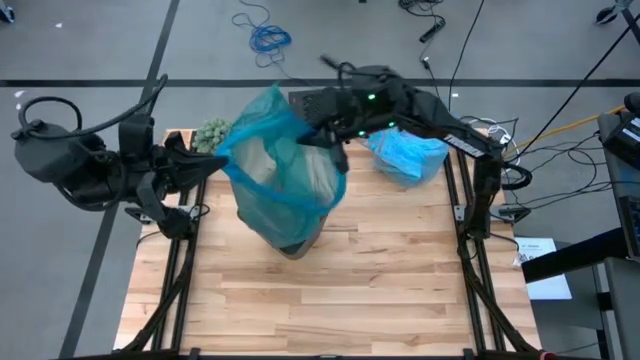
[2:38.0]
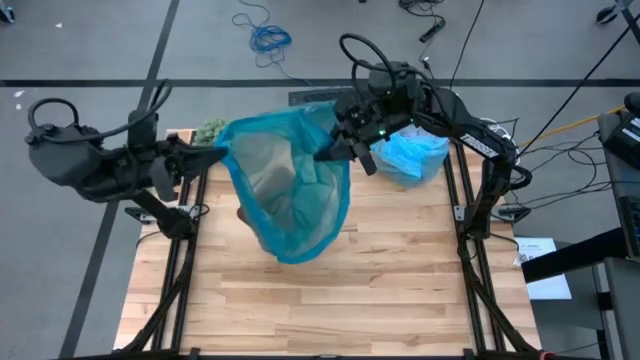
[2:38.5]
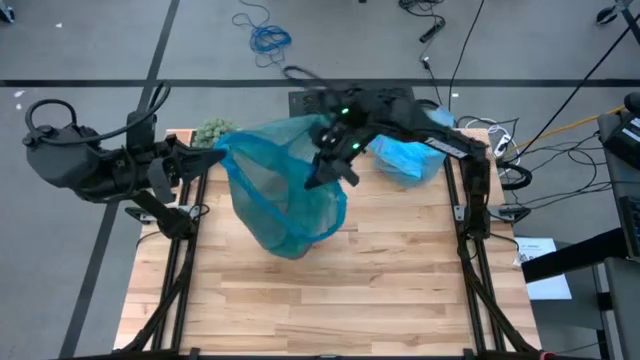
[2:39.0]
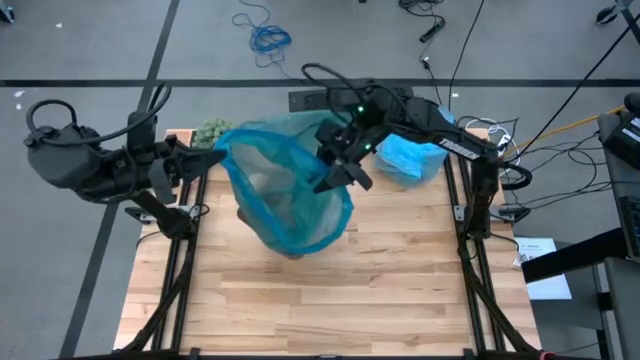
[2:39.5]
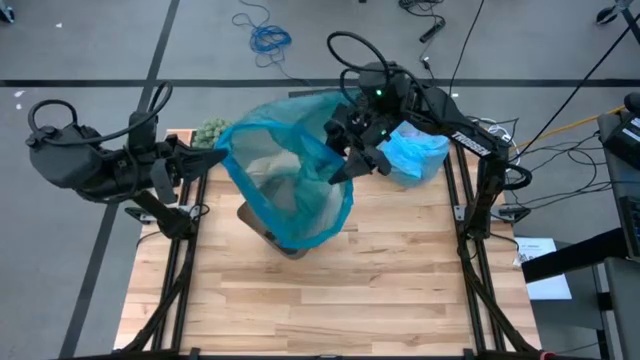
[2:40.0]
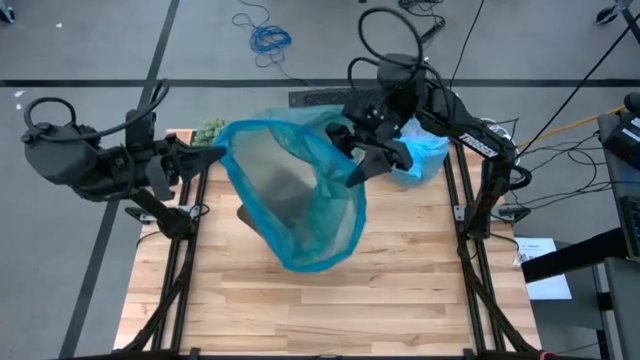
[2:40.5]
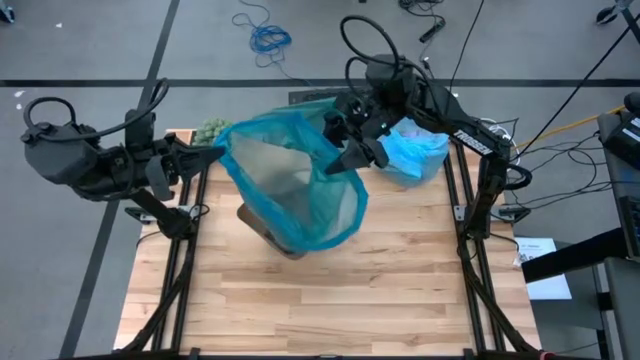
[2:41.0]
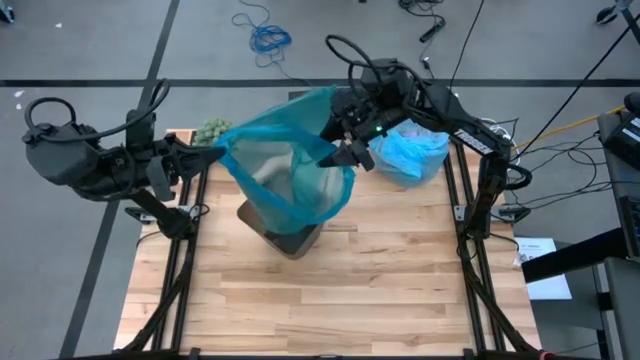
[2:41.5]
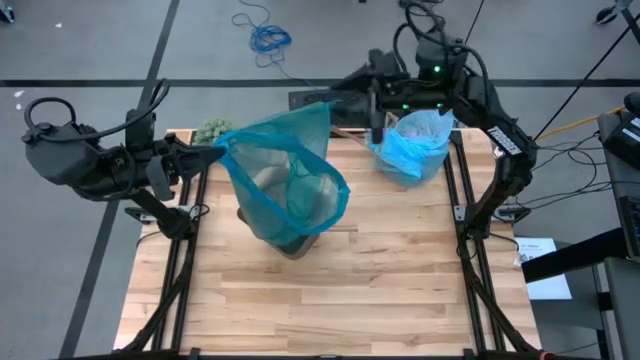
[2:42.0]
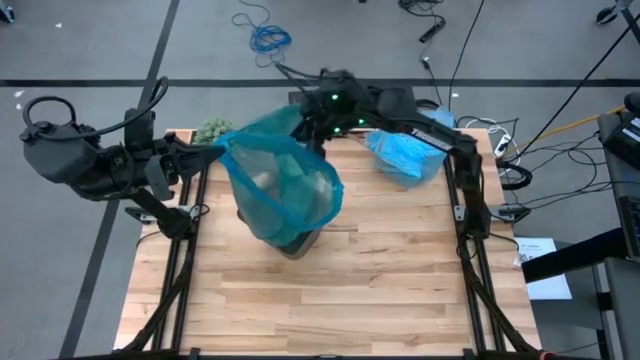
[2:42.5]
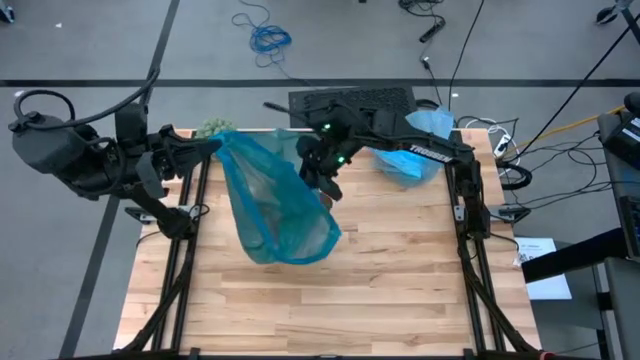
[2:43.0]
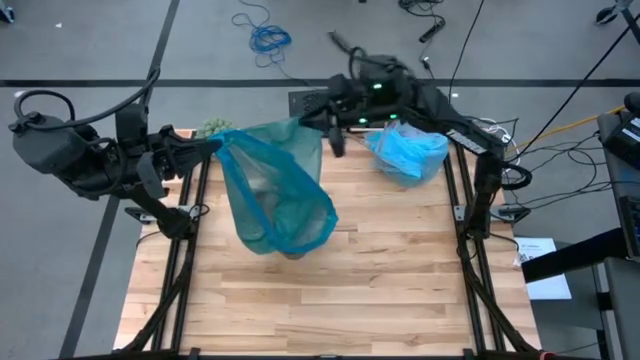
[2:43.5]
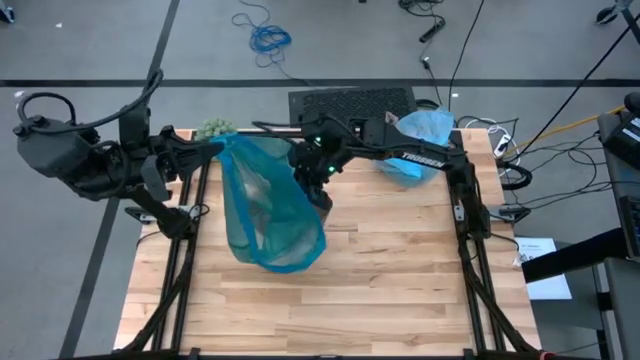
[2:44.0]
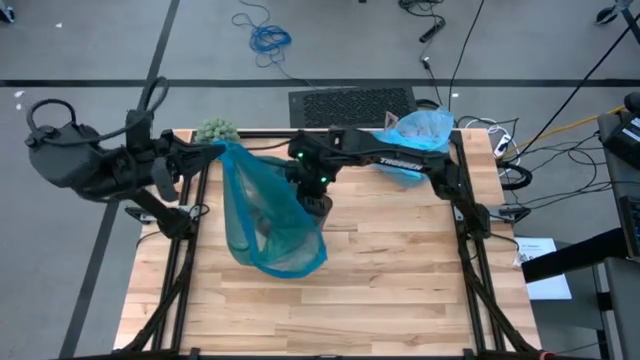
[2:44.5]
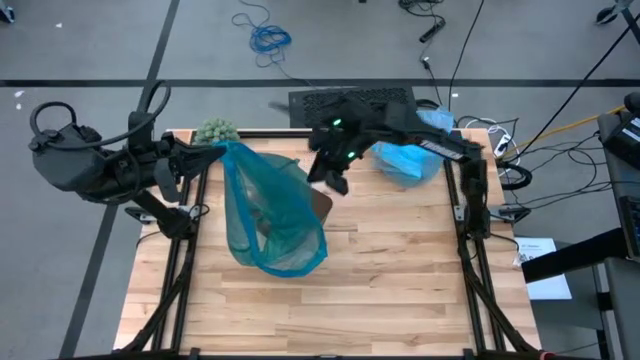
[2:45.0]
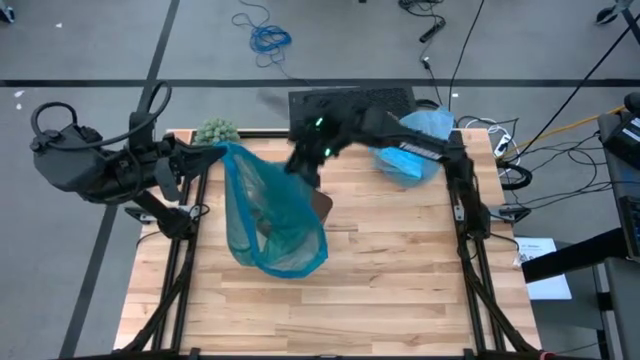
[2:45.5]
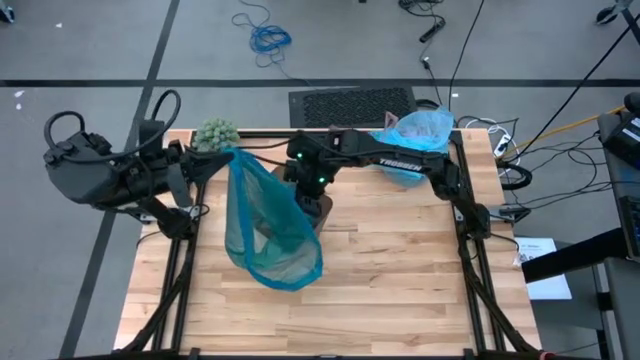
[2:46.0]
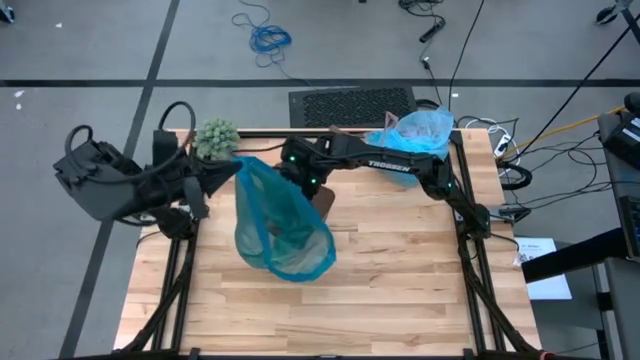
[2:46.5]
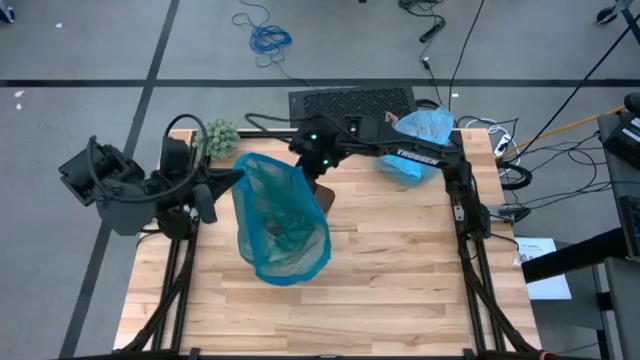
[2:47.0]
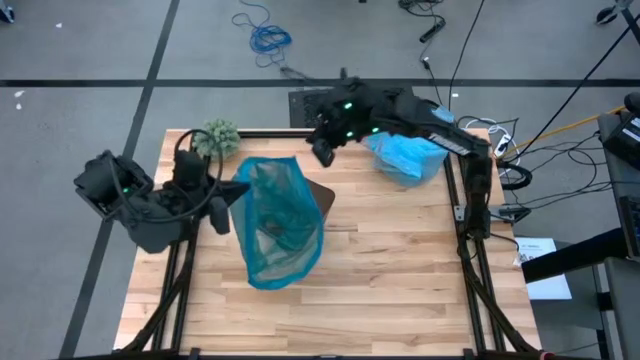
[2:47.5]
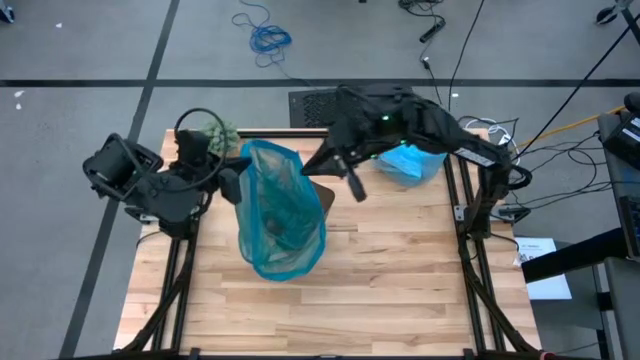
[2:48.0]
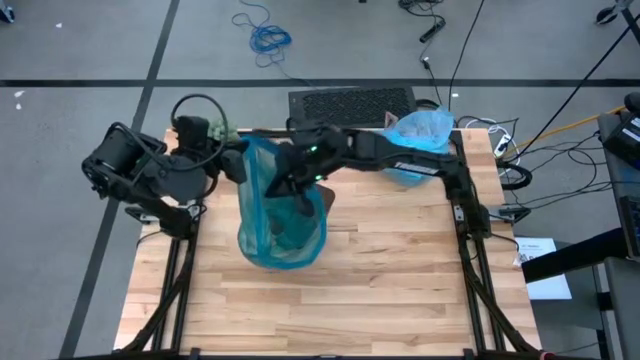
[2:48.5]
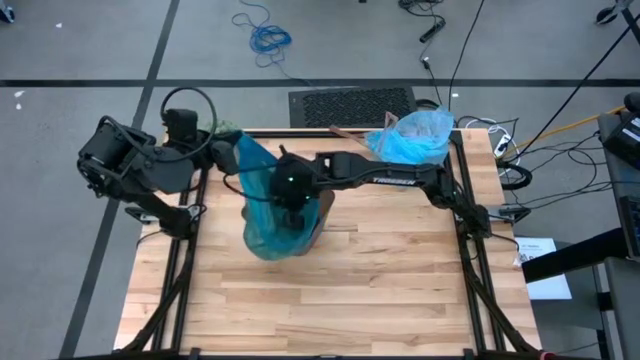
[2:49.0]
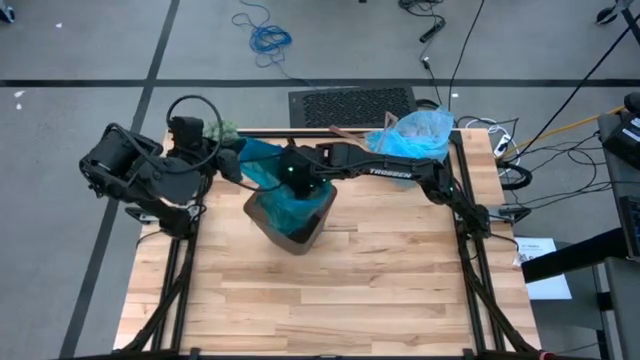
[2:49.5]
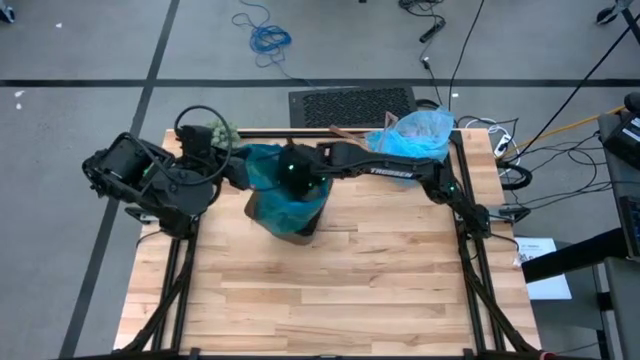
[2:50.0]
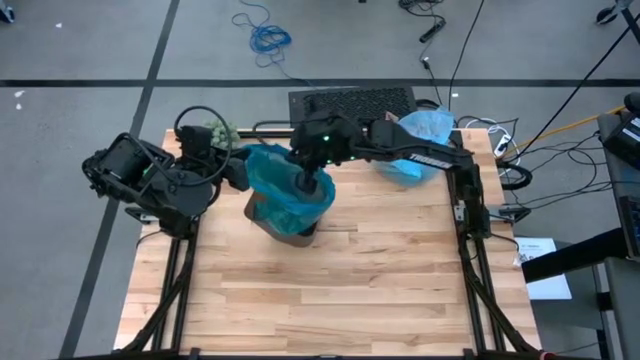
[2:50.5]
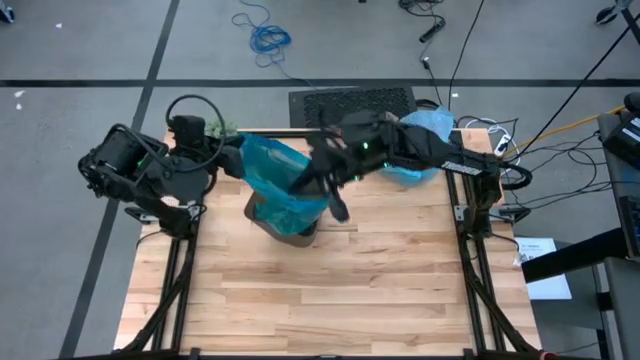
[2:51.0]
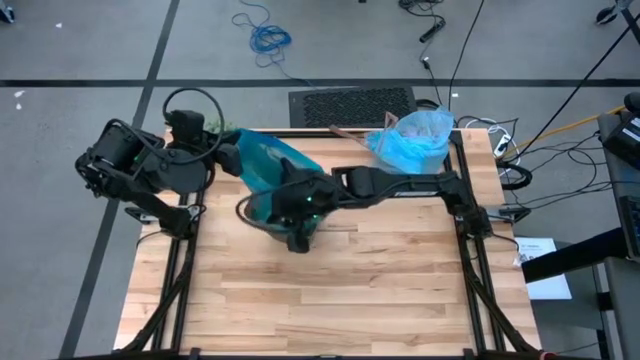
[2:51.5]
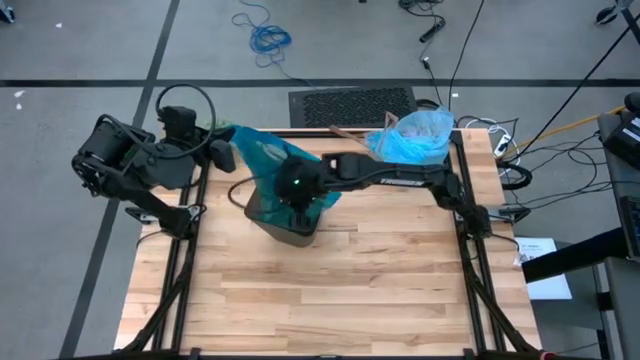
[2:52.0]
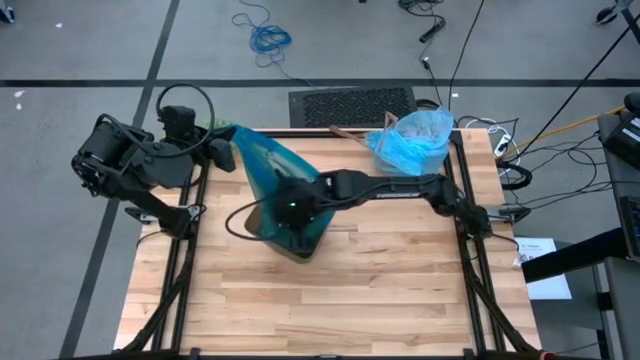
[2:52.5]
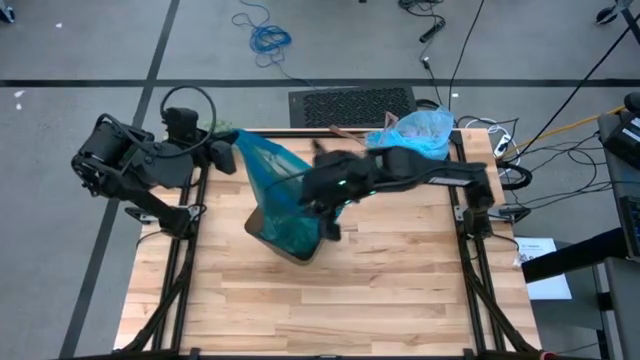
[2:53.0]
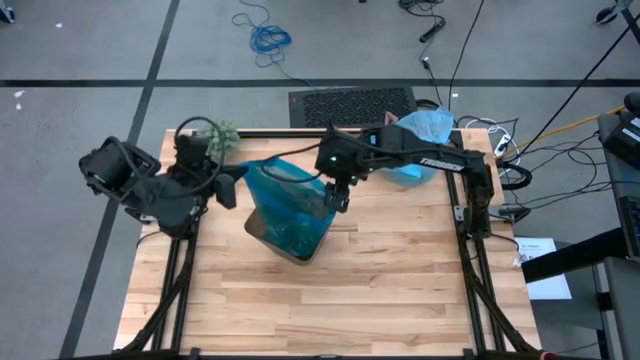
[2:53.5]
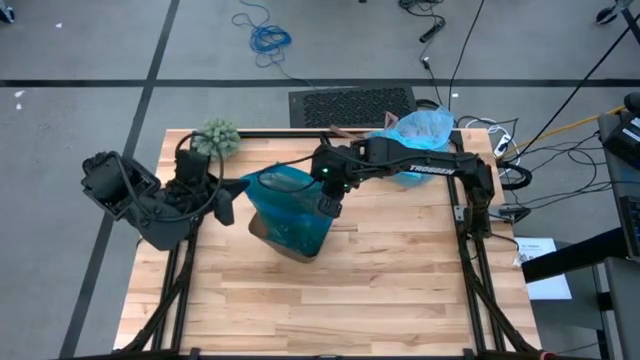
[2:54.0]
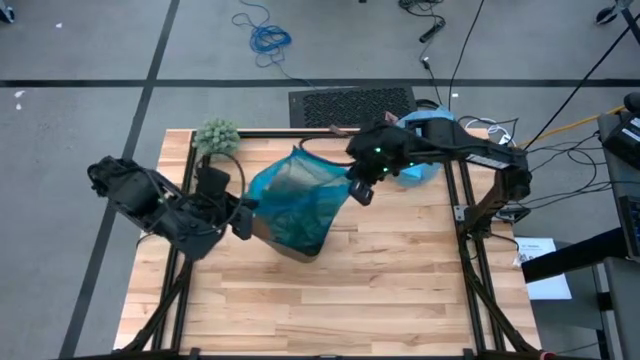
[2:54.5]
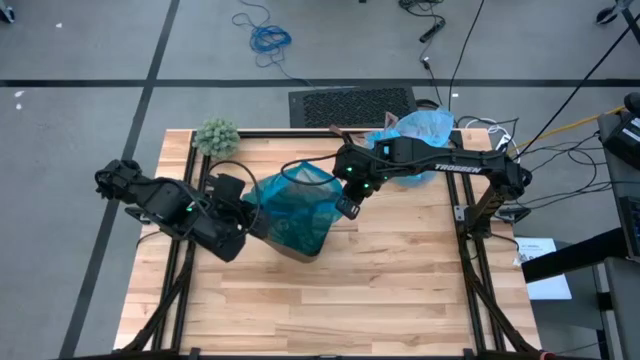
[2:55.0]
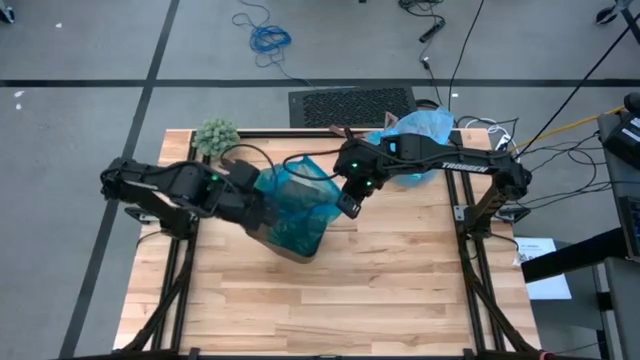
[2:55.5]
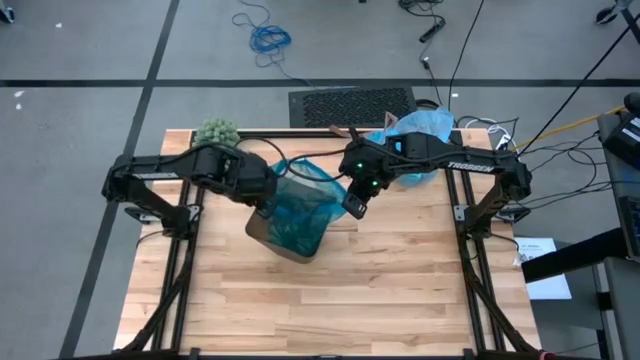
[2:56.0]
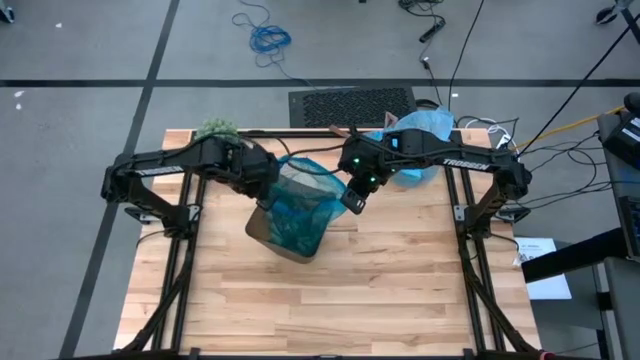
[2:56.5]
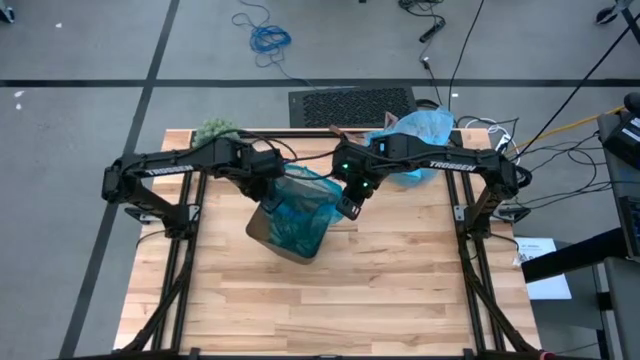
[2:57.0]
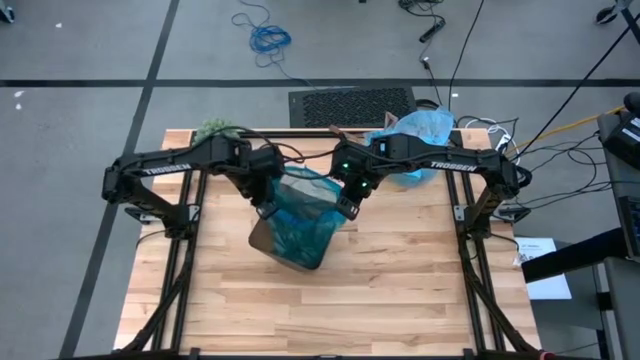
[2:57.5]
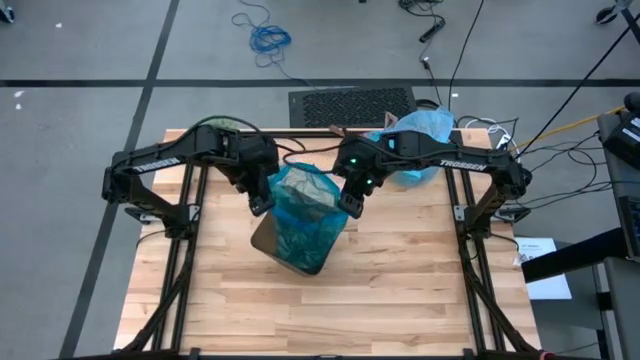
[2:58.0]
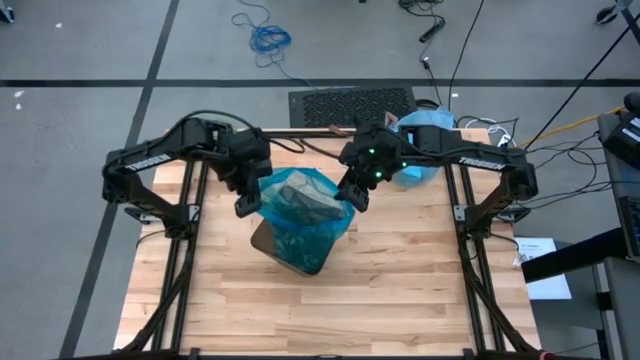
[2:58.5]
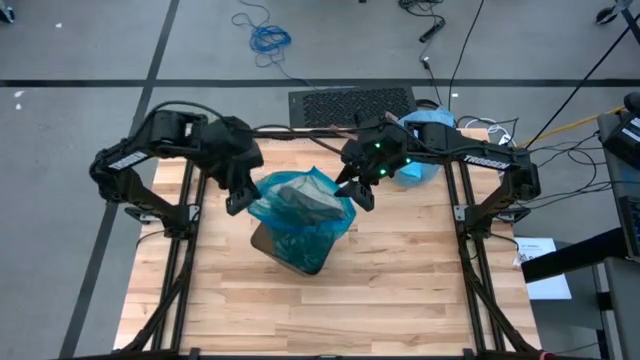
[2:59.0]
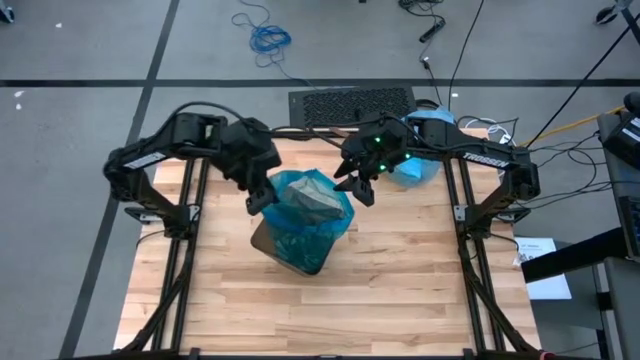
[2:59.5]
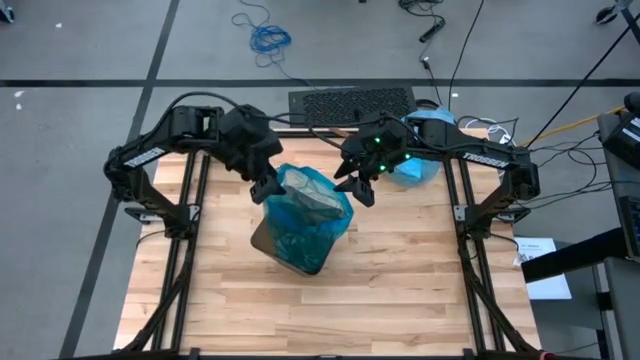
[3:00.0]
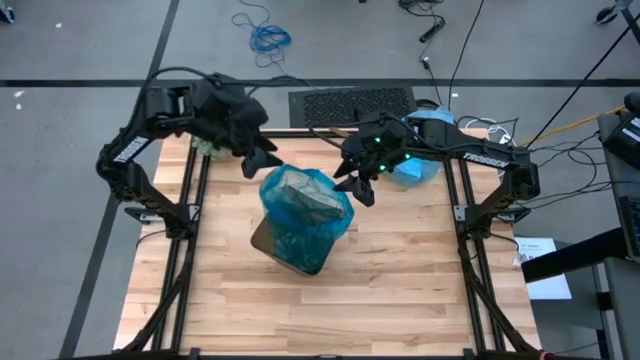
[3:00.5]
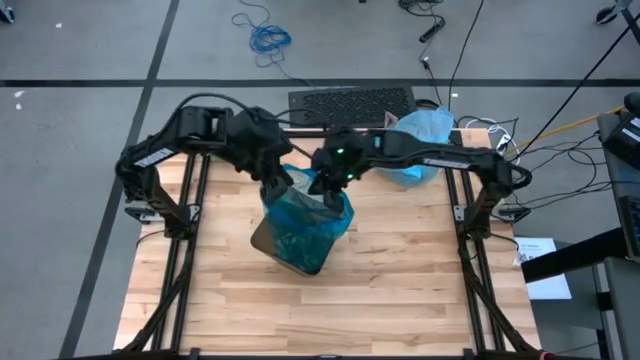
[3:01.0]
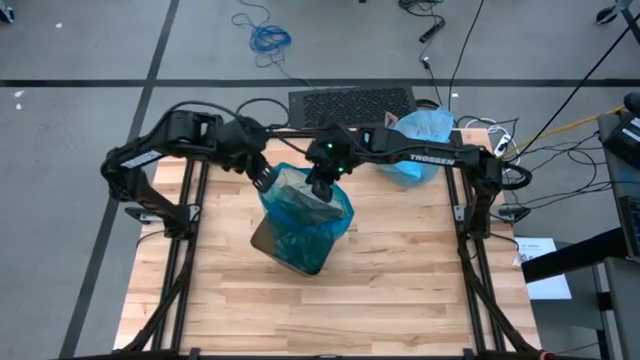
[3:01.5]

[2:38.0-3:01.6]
Task: place trash/remove bag and relplace
Insert the bottom blue trash bag into the trash bin
